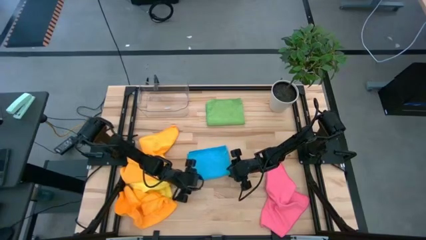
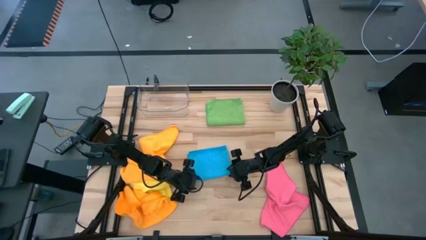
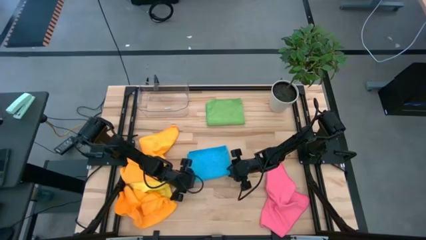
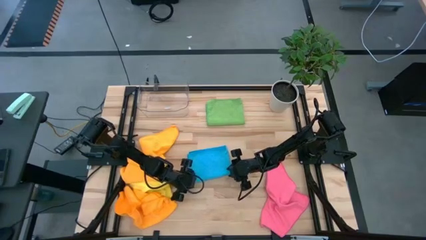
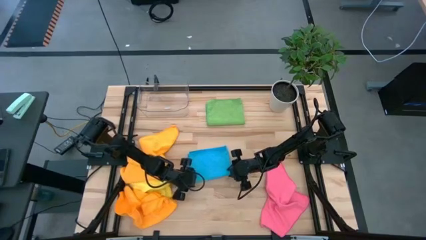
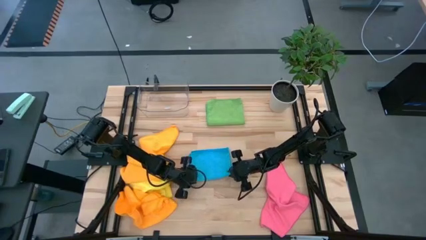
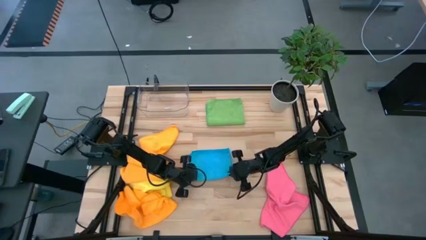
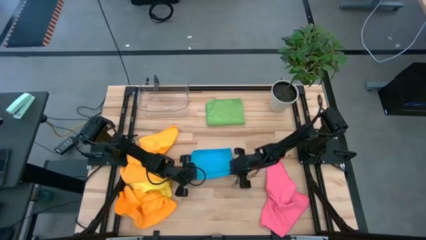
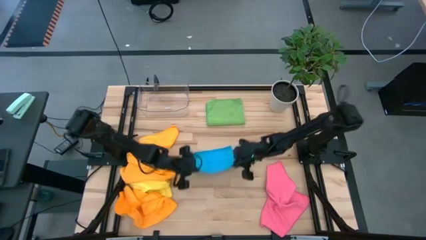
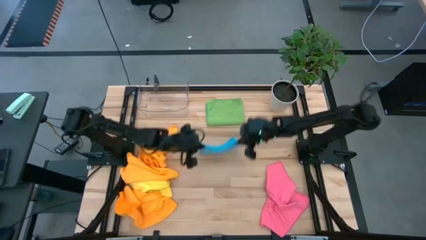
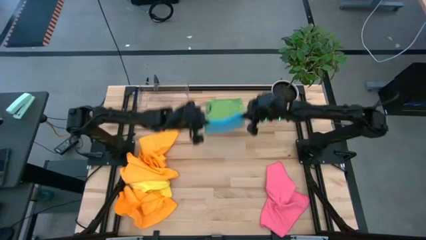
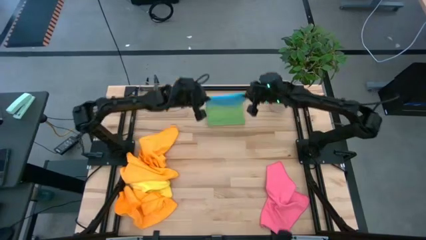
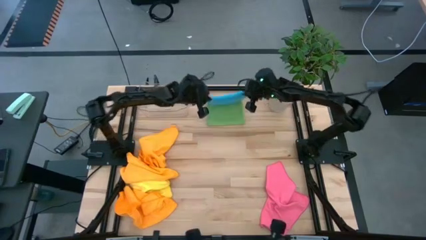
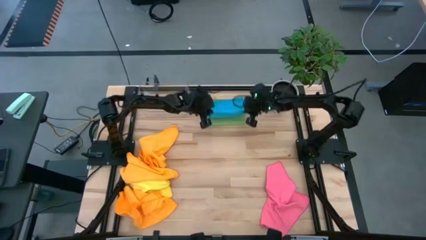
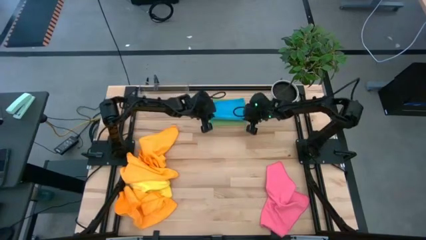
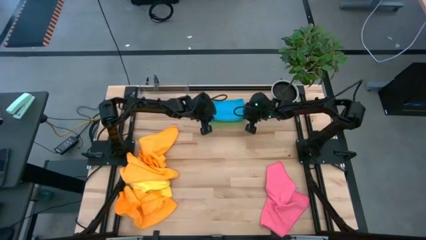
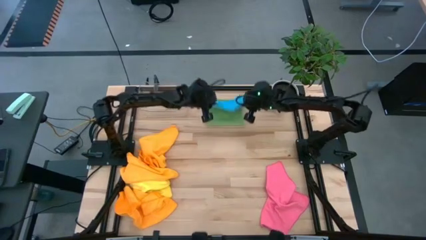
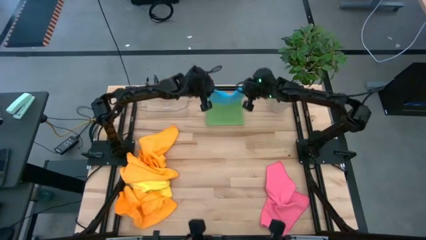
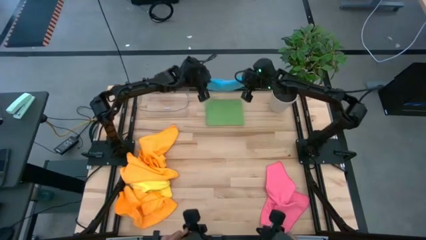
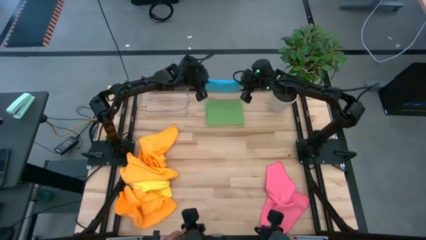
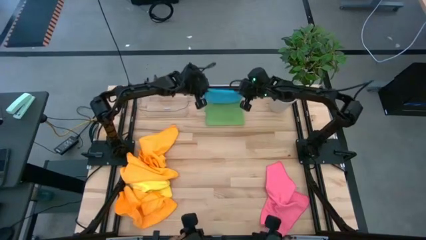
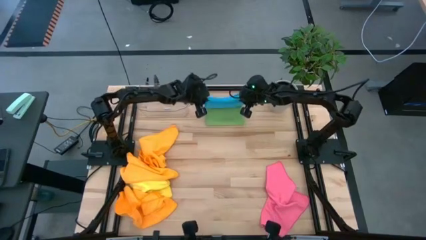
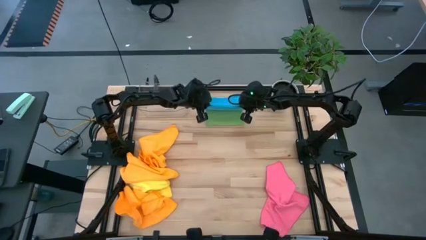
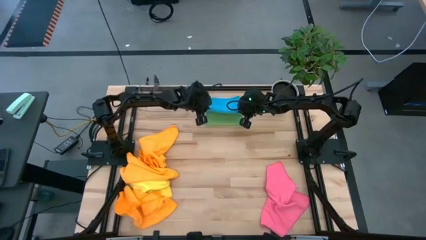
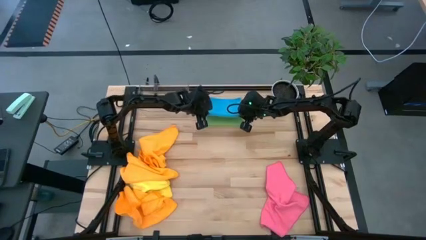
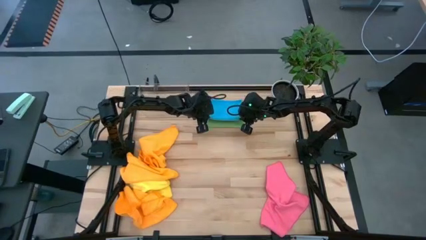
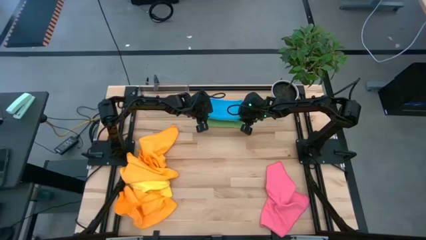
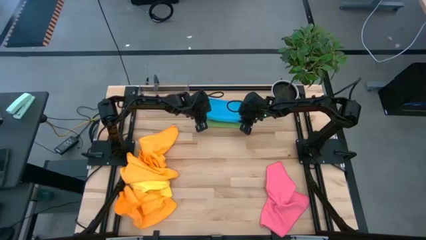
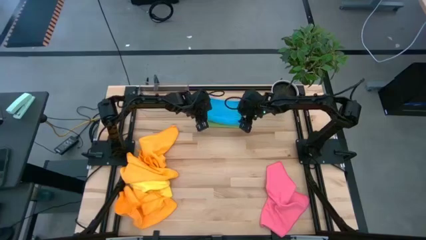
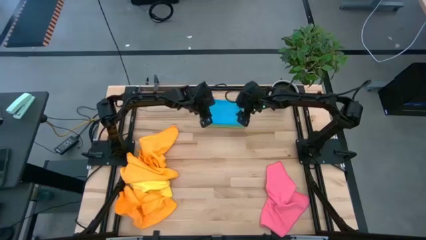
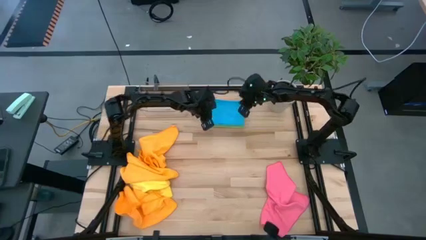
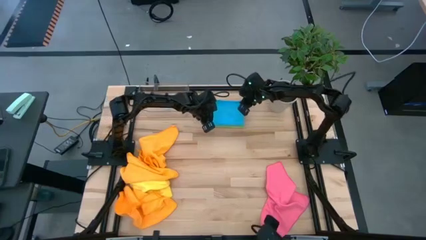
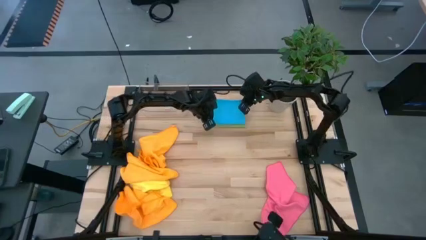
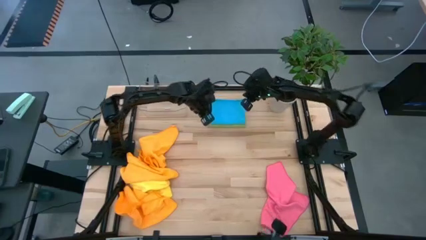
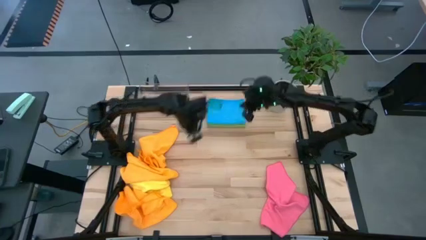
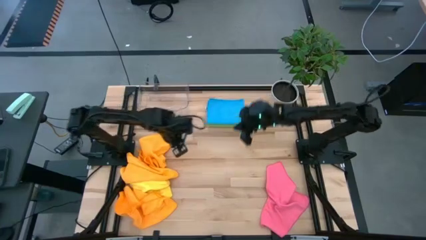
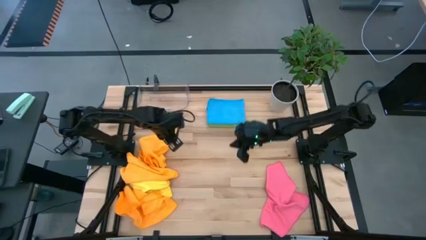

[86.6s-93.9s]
Task: Fold microfiber towels
Stack the folded blue towel on the green towel

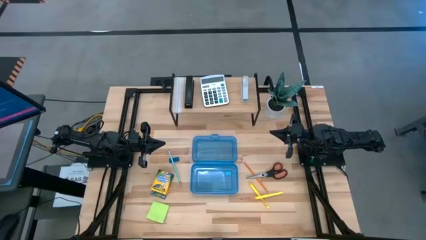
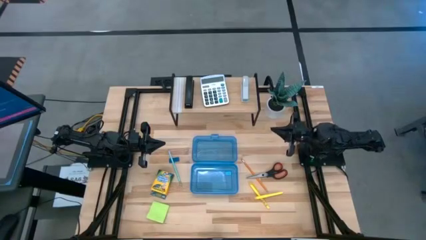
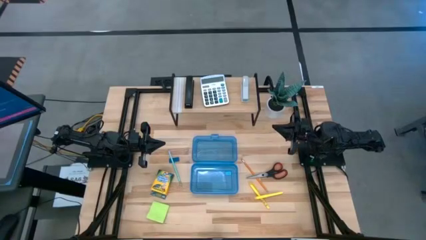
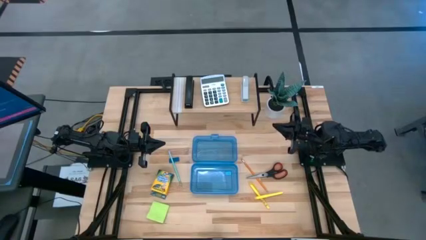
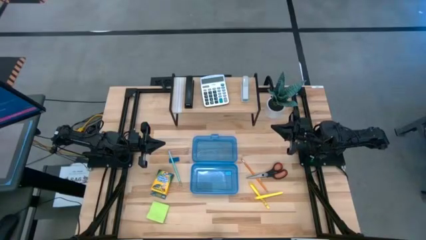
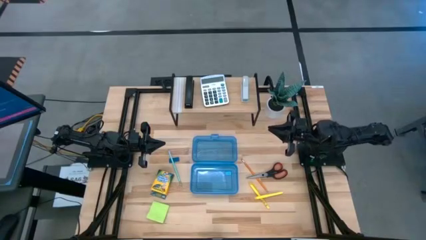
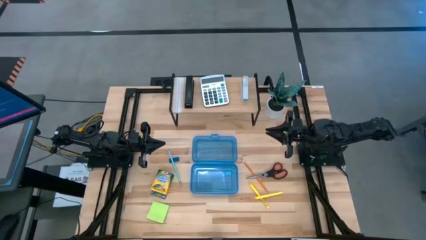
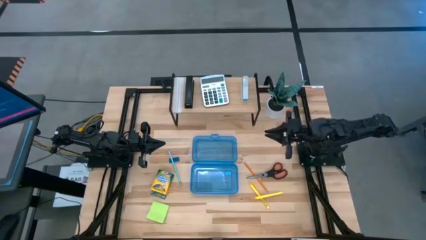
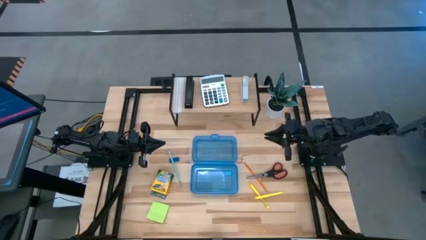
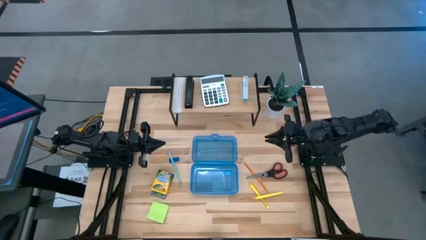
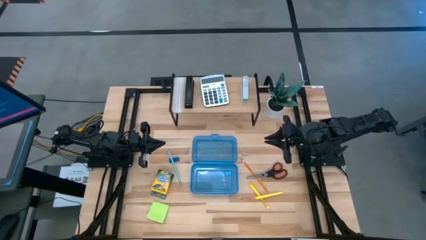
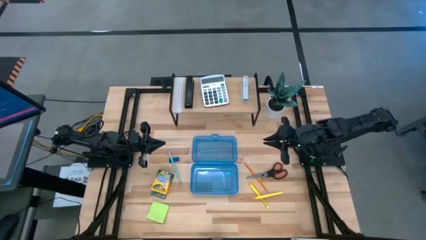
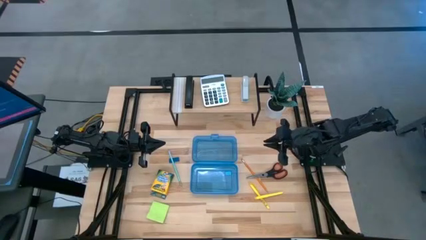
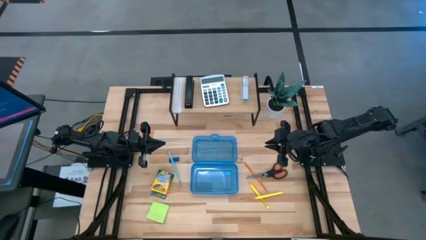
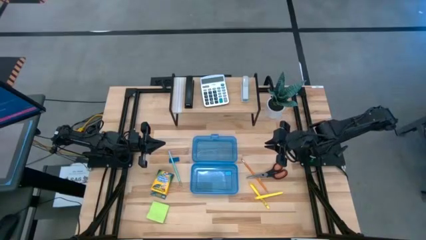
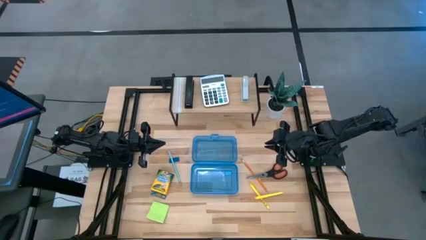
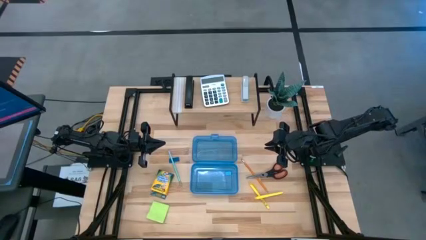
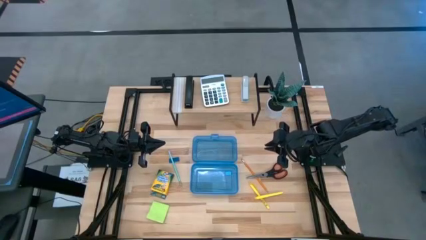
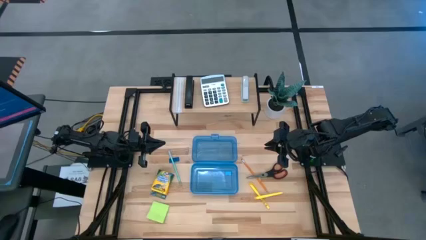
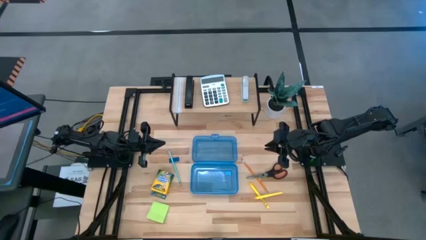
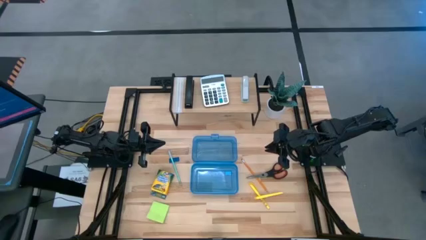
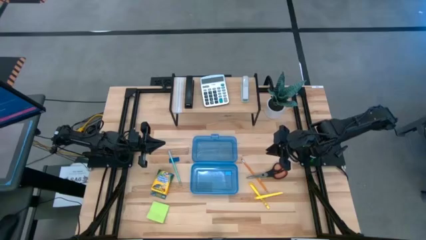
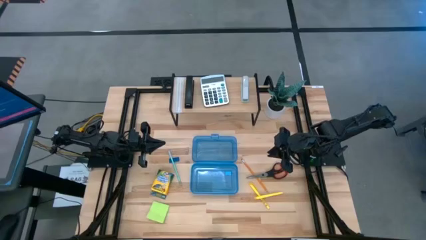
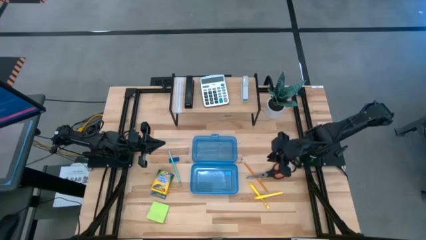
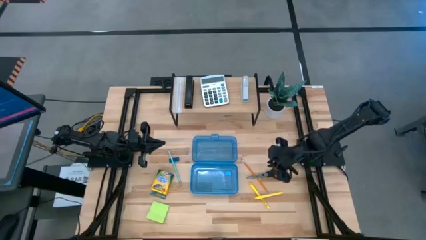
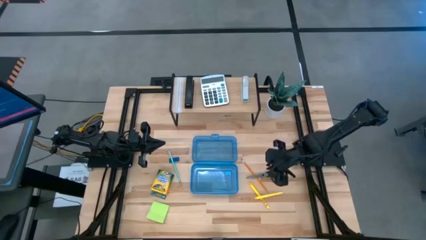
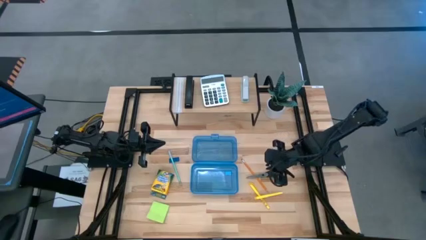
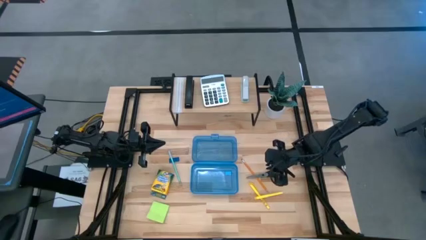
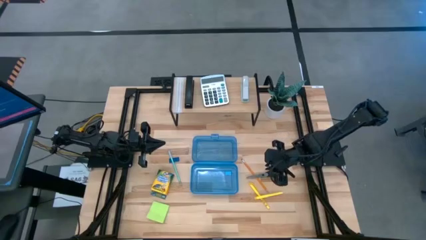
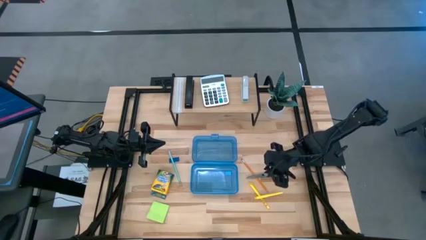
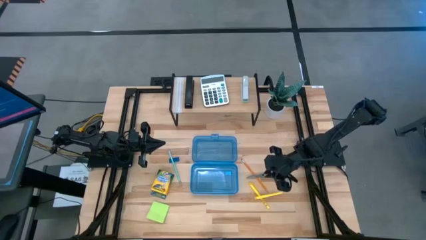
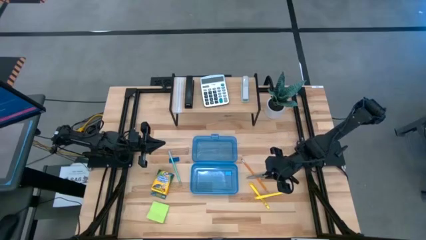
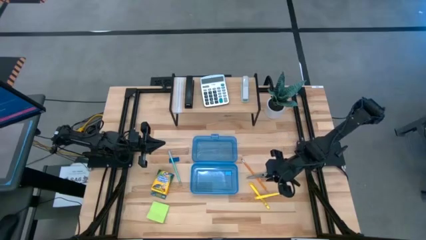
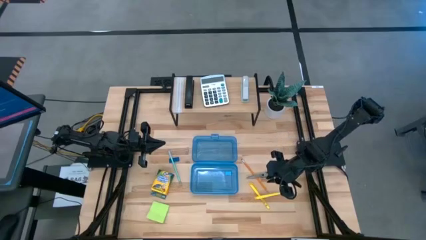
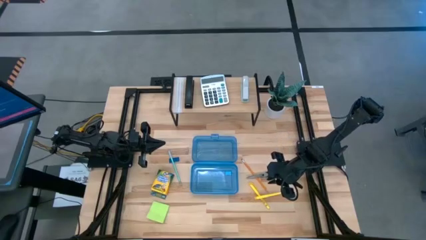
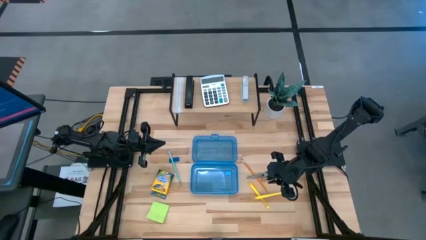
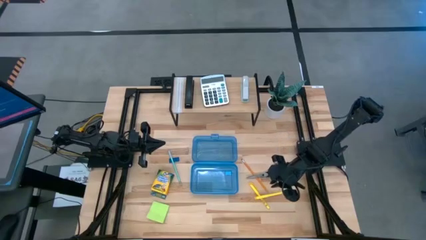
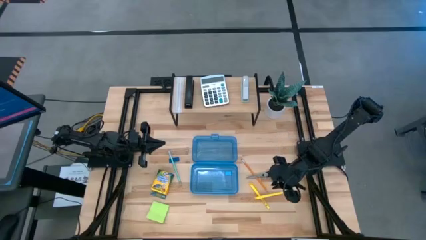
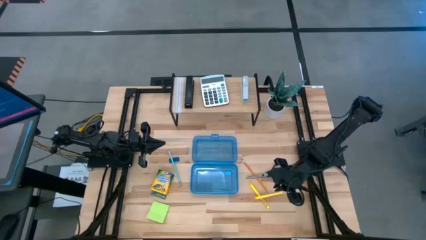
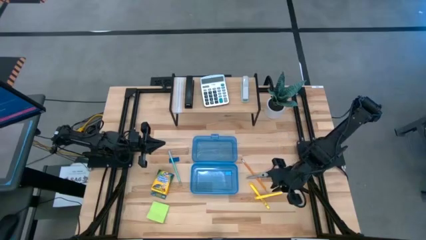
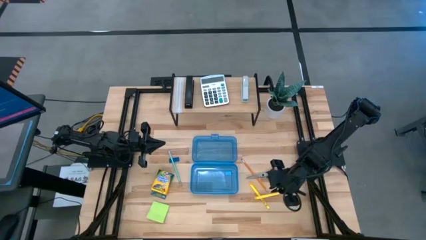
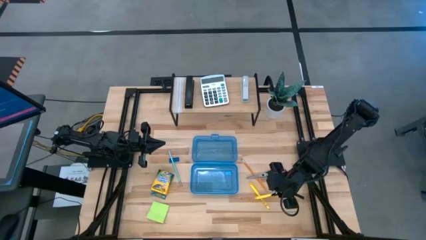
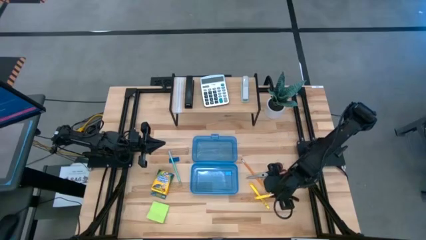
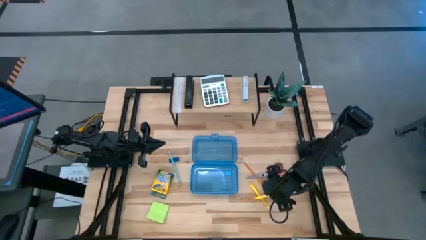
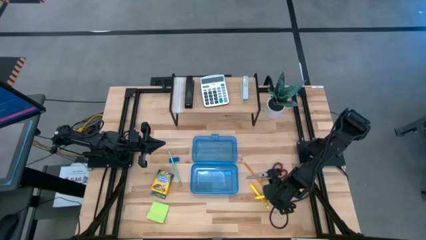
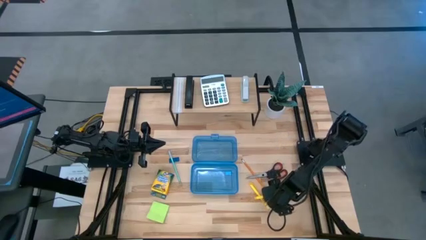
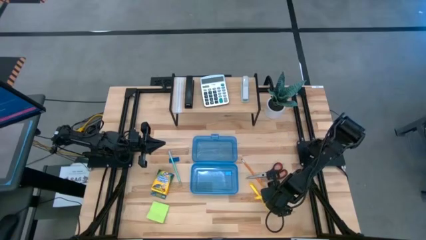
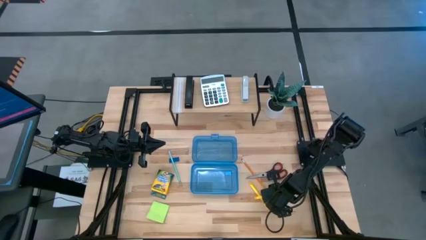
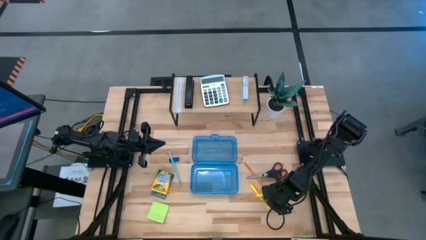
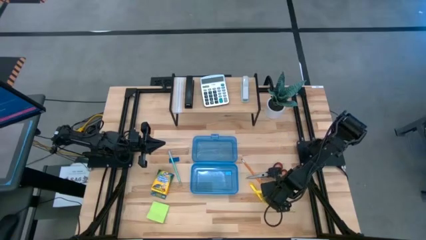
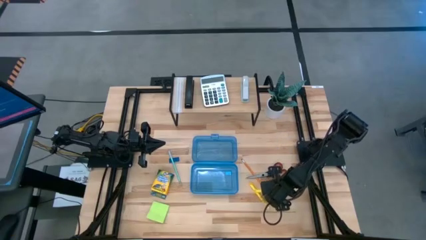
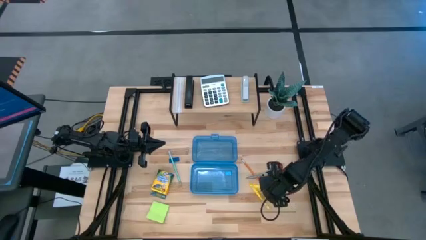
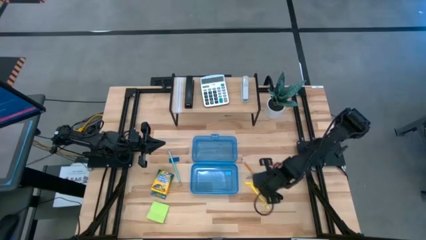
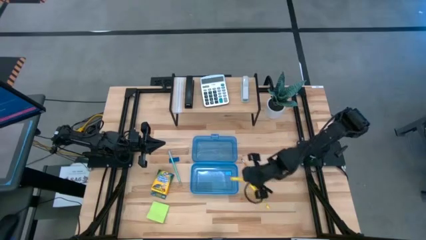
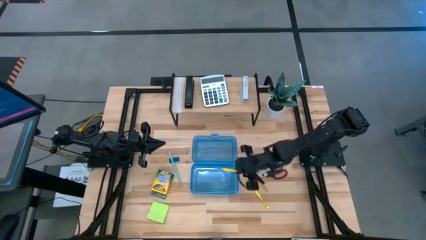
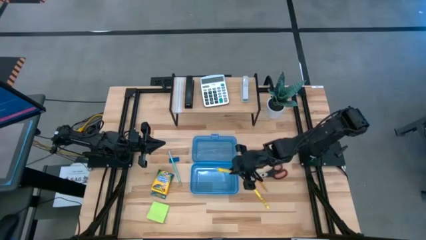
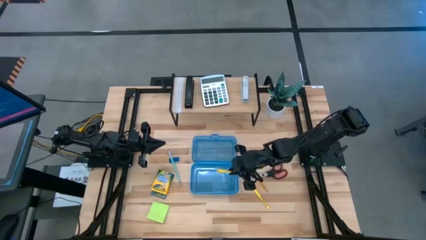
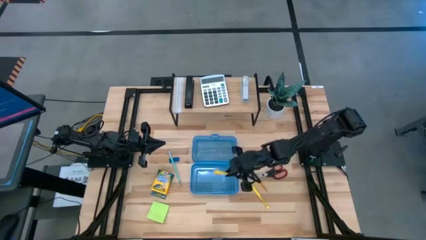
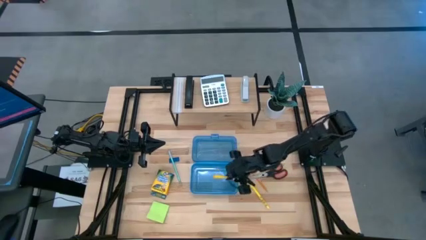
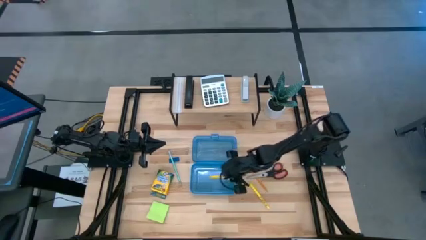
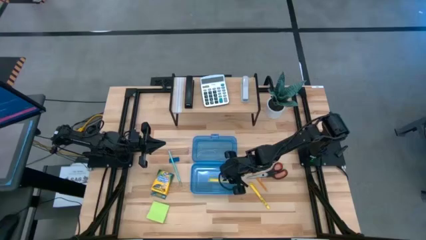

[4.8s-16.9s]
Task: Pack school essentials
Put the yellow pen into the blue supply box
